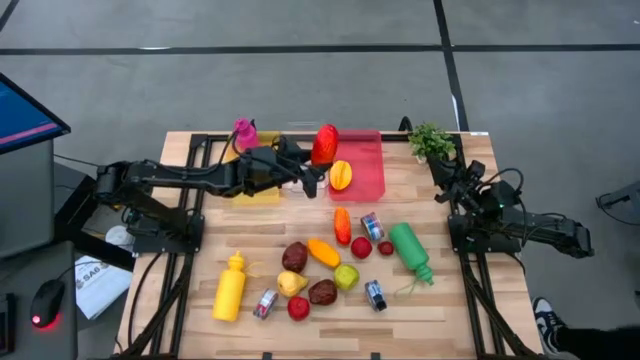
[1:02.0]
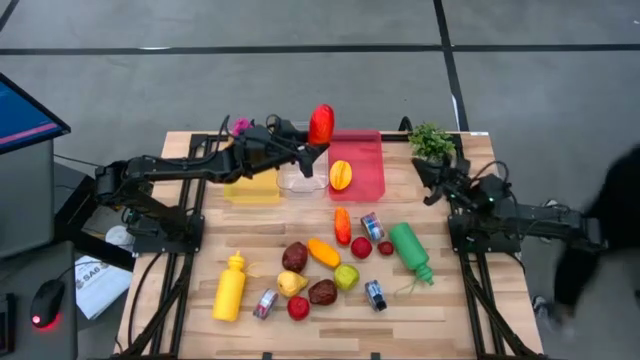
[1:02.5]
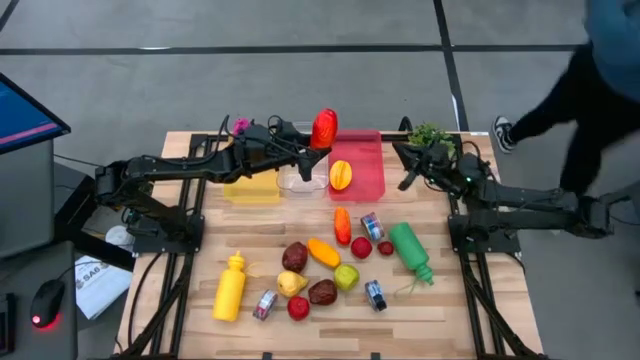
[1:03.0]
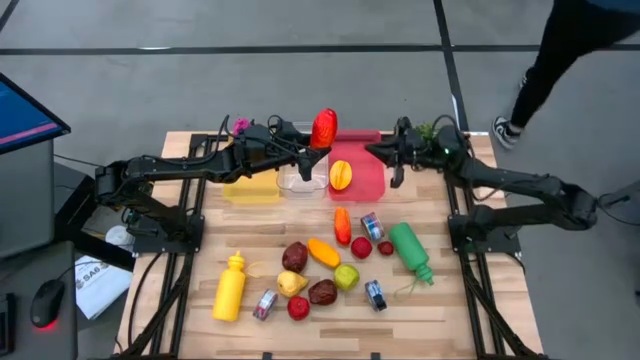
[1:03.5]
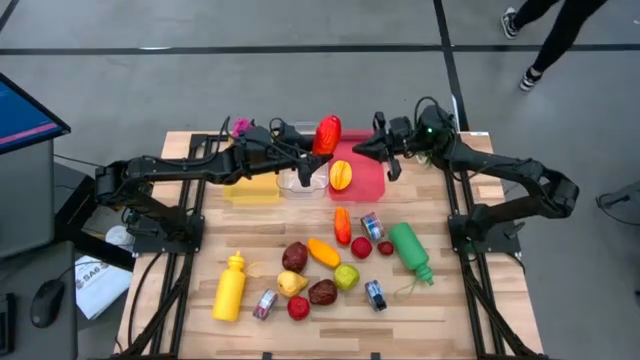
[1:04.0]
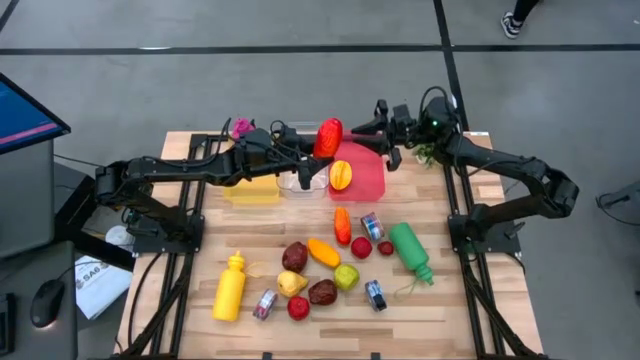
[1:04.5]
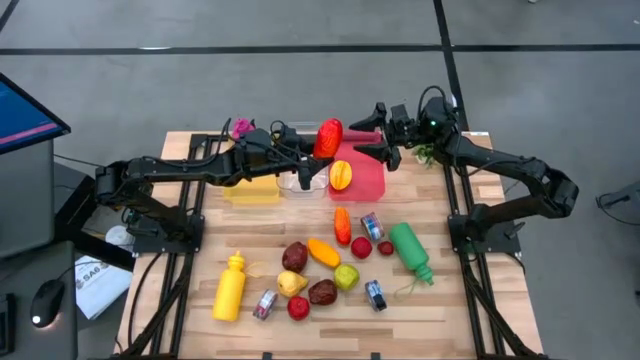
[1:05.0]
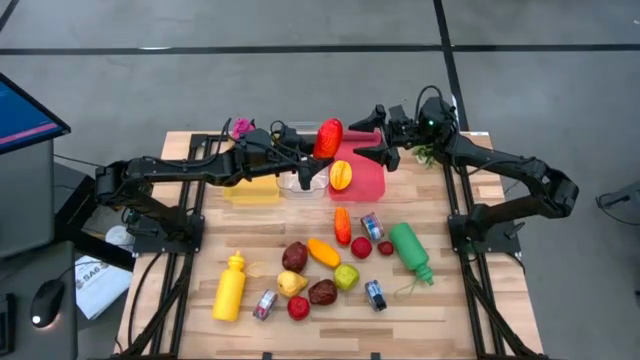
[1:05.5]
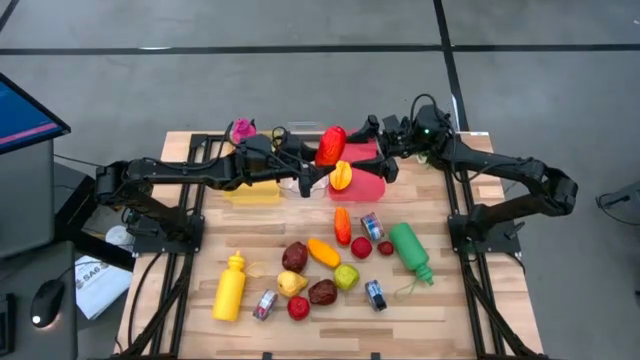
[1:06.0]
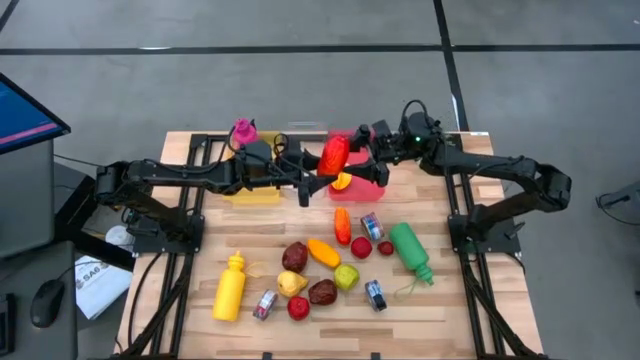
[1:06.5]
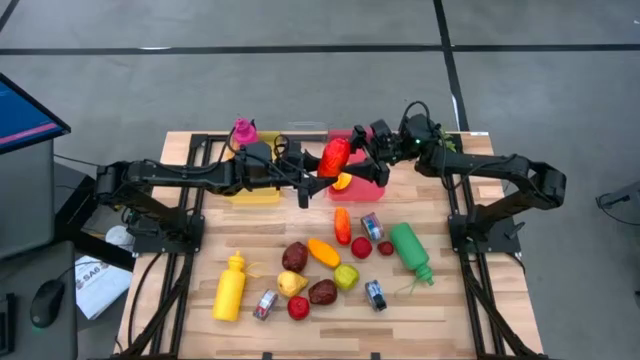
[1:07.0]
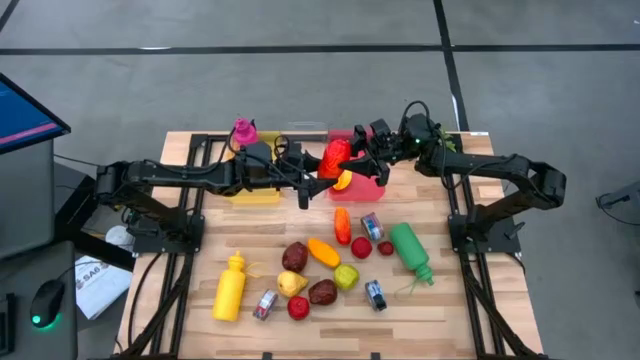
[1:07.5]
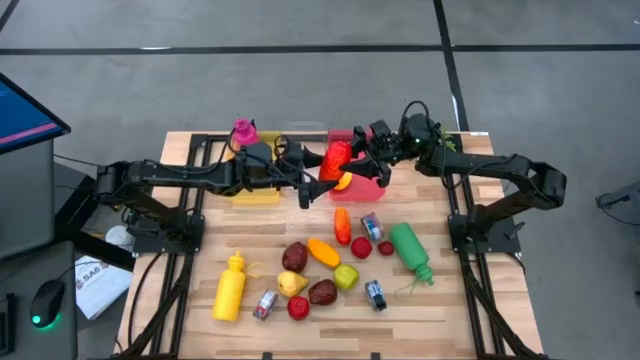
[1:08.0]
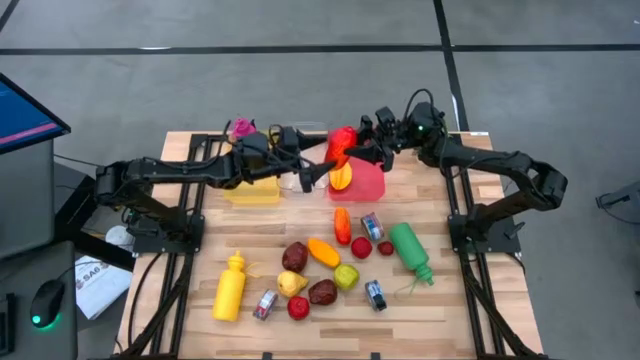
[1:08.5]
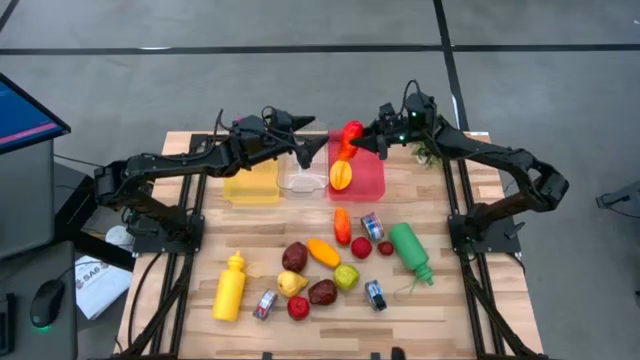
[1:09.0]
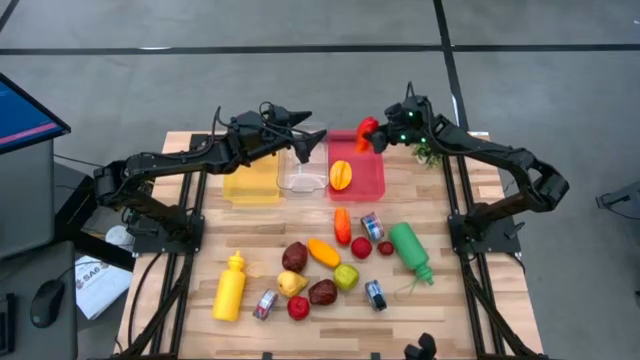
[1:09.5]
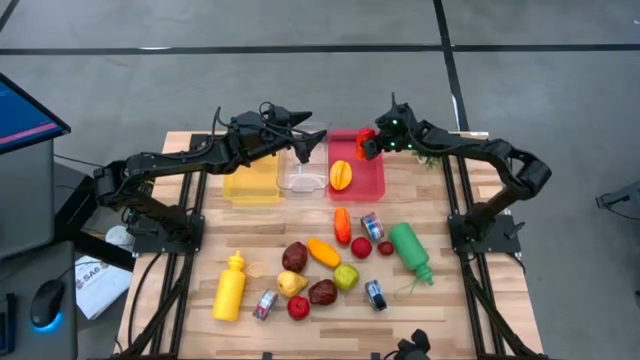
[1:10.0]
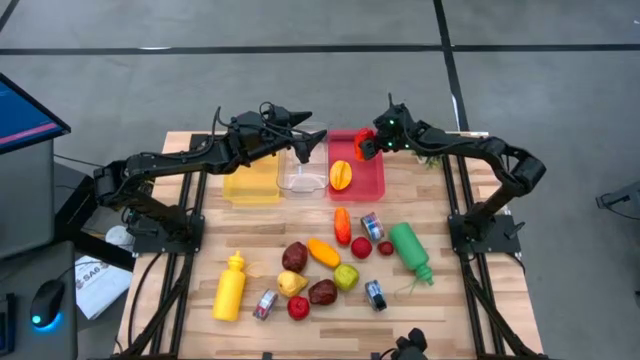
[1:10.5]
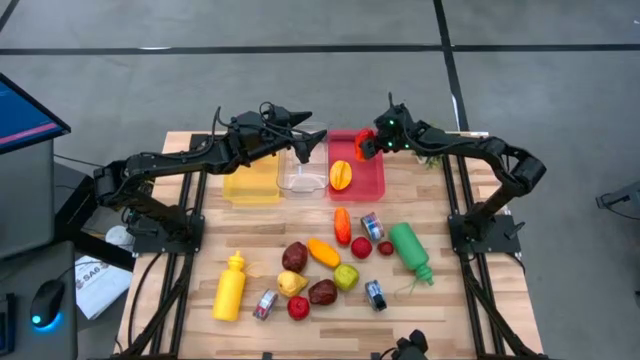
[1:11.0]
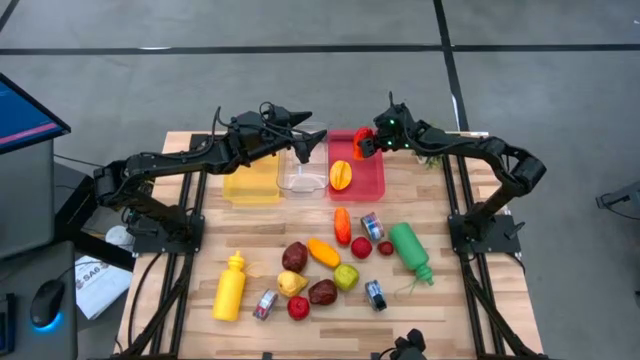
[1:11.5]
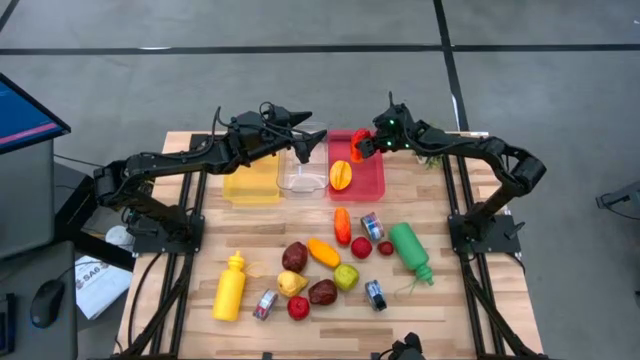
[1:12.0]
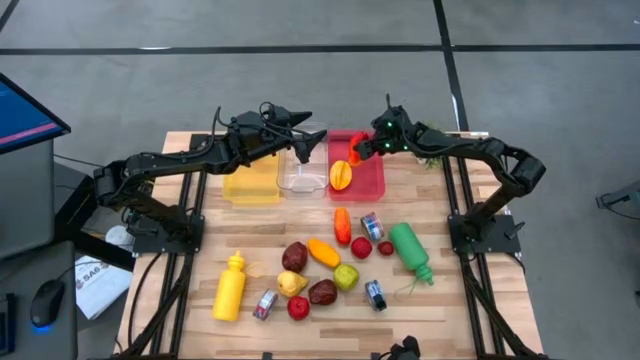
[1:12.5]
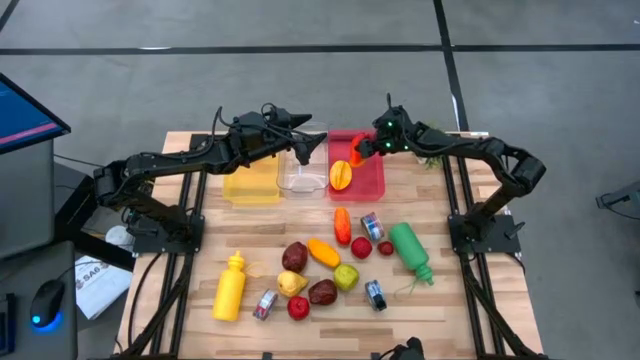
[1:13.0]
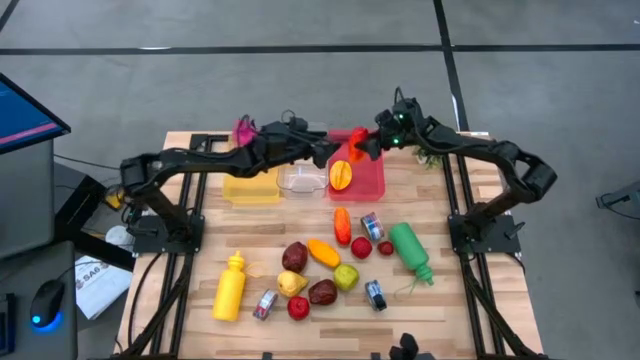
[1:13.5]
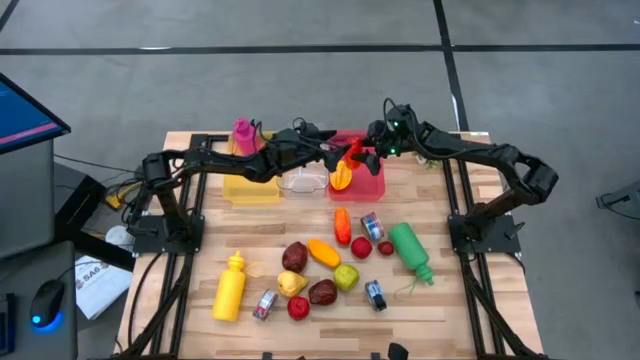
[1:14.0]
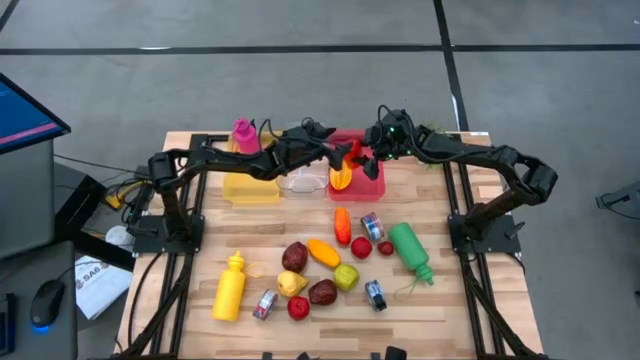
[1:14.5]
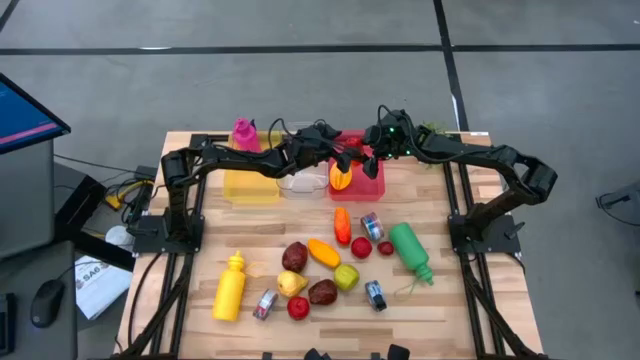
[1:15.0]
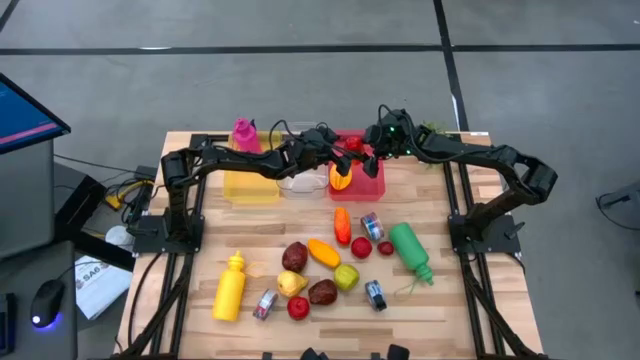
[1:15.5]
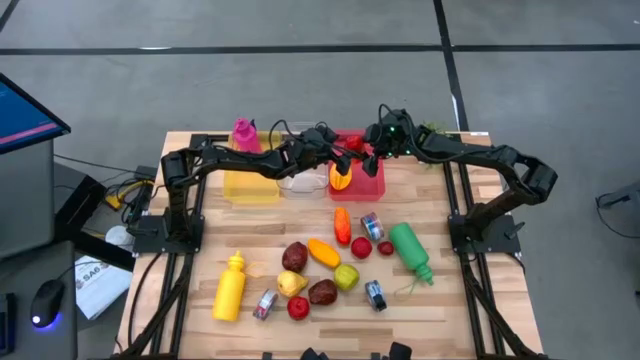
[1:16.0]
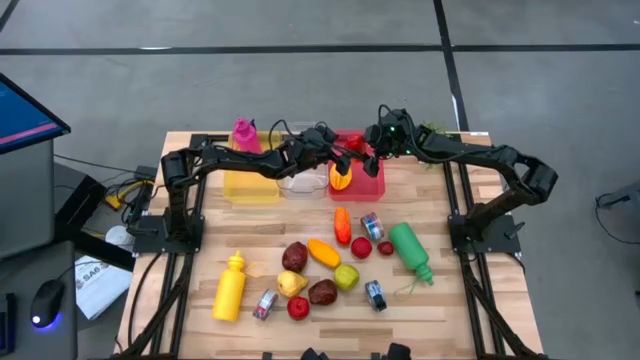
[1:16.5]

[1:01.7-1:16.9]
Task: Pick & Place Food Item
Put the left orange mango into the pink bin

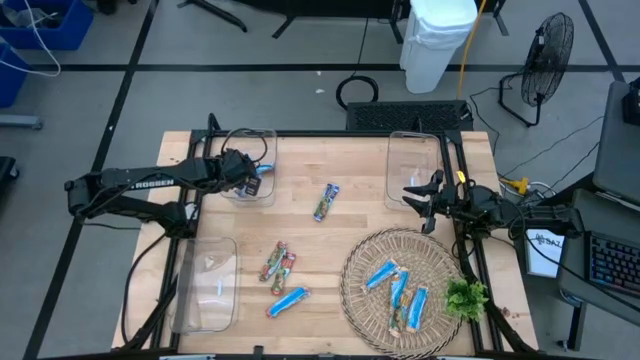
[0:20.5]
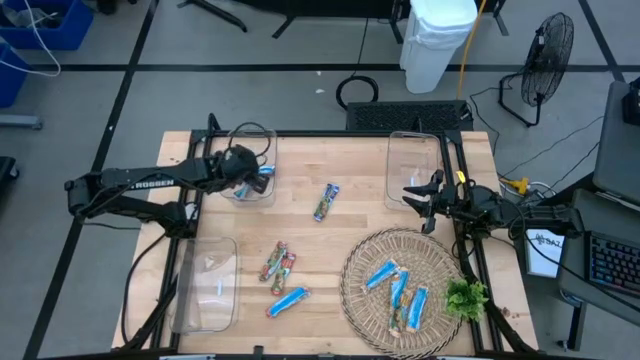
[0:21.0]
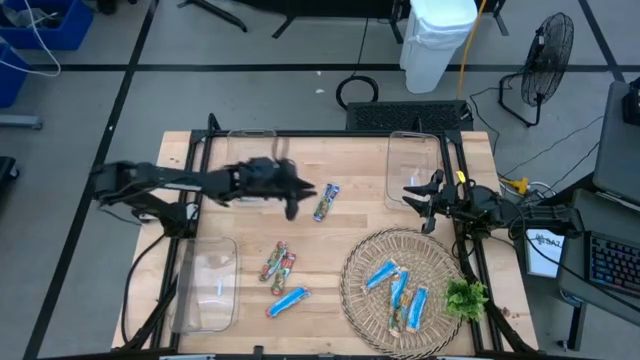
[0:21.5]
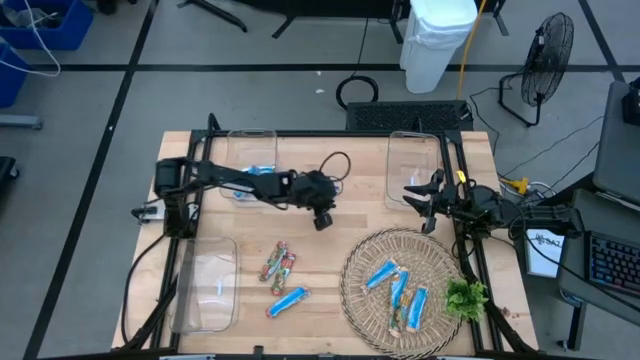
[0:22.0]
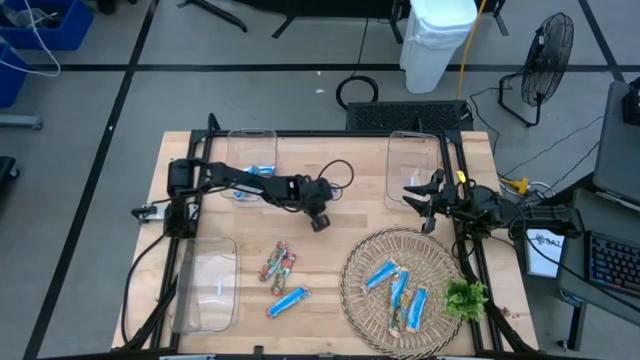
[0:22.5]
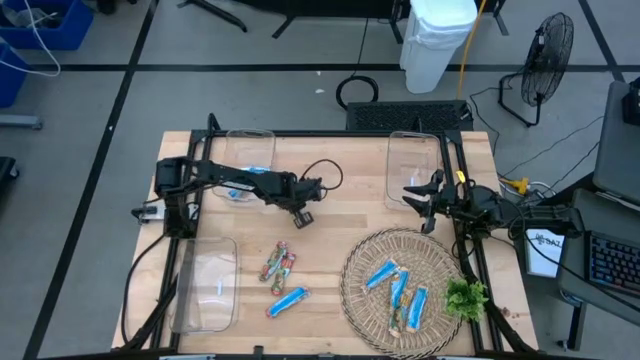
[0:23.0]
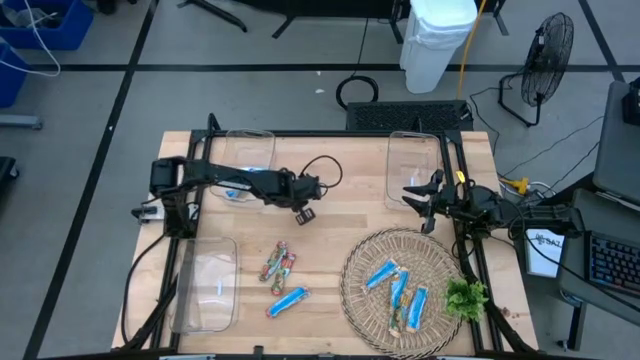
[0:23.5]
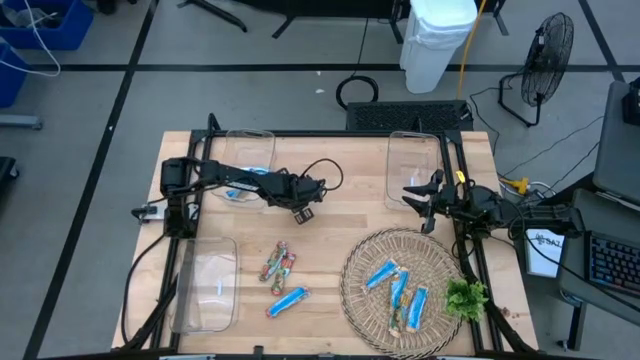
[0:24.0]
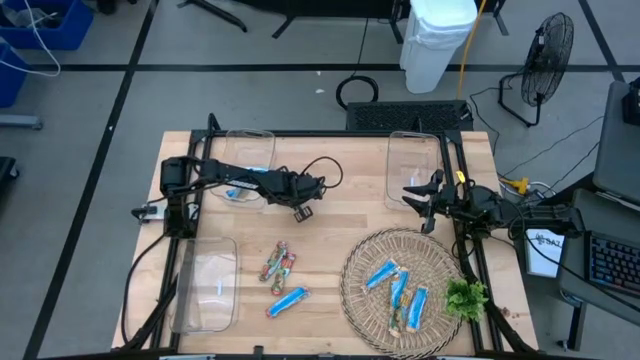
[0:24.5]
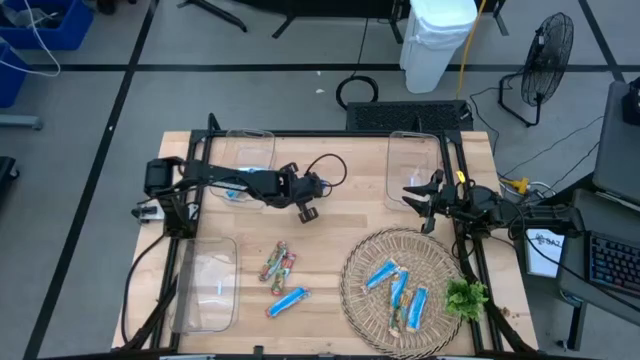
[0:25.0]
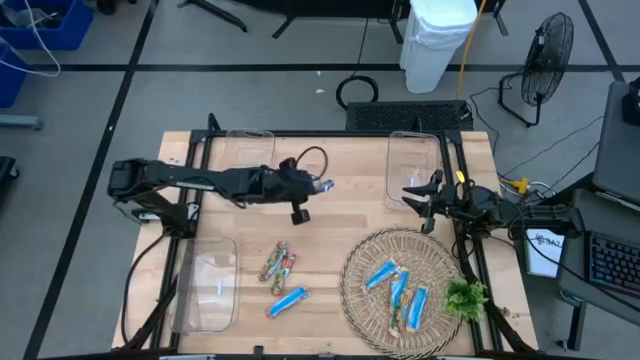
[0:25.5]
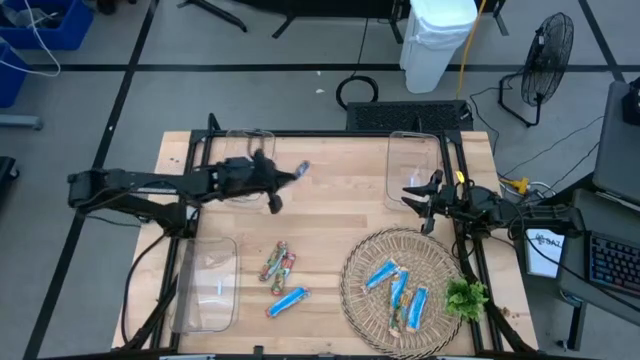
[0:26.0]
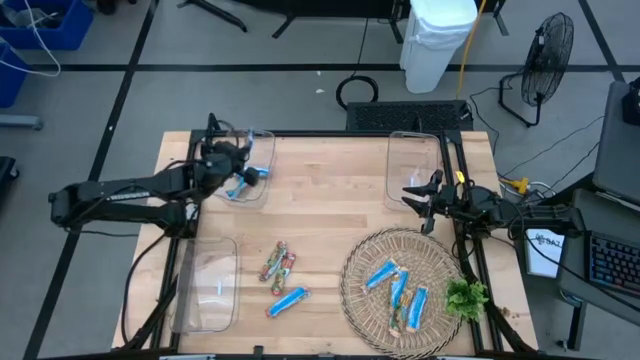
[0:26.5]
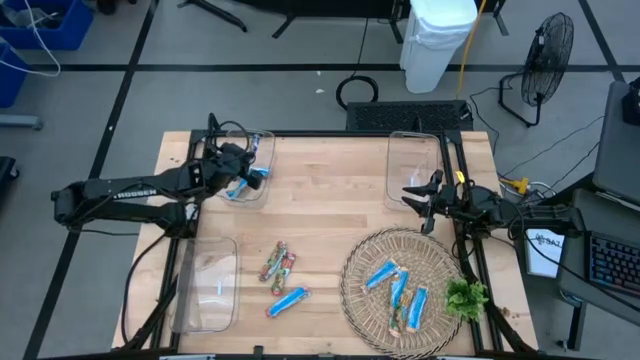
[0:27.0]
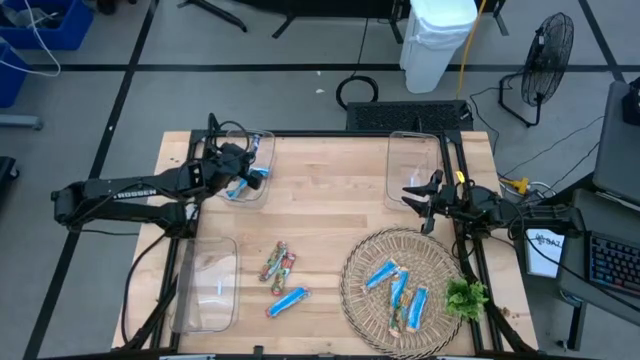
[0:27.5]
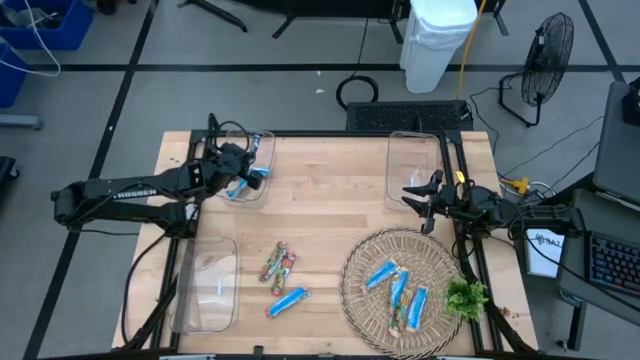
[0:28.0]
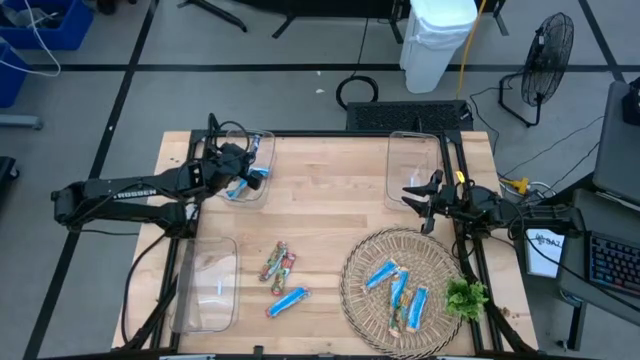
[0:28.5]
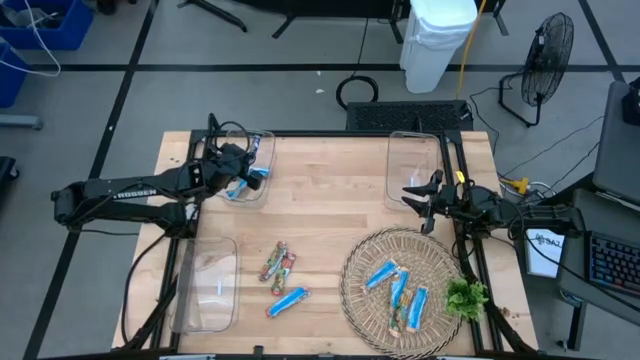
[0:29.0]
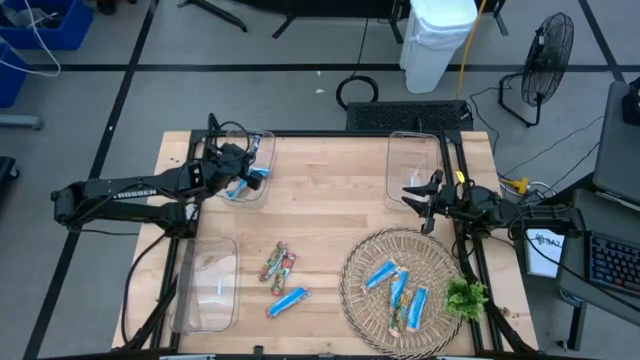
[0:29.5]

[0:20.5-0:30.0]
Task: Pick and place Granola Bars by type
Put the blue granola bar into the top left transparent bin
